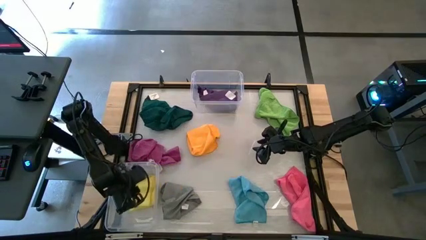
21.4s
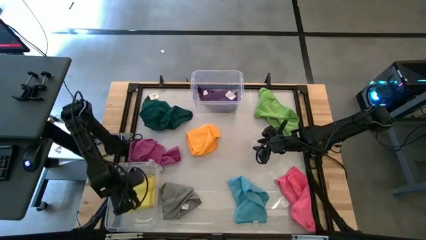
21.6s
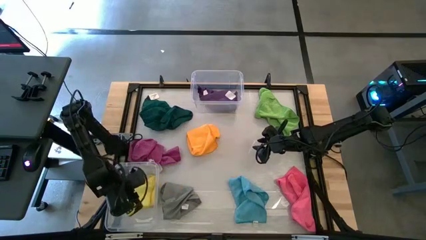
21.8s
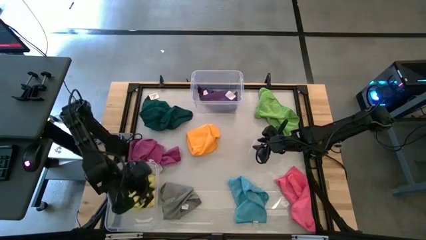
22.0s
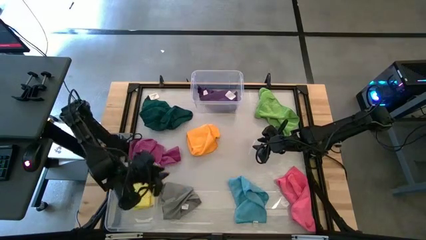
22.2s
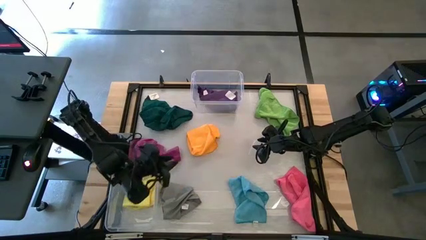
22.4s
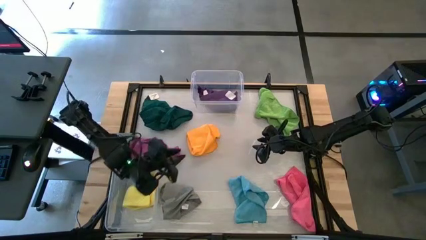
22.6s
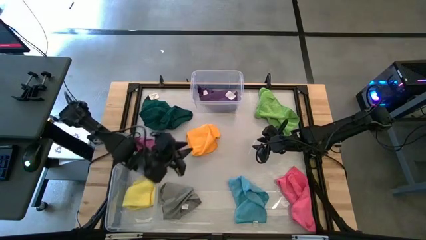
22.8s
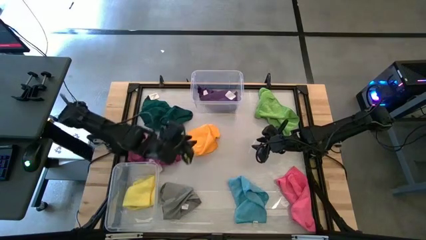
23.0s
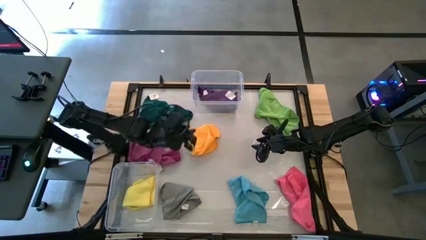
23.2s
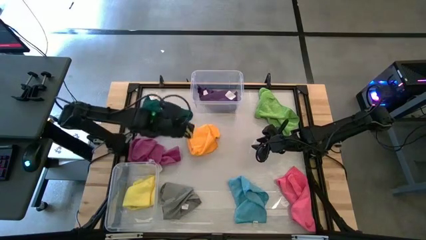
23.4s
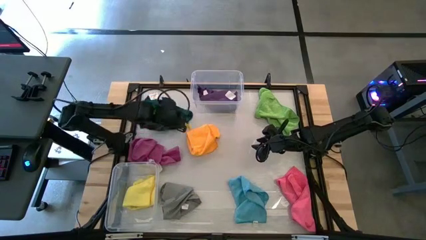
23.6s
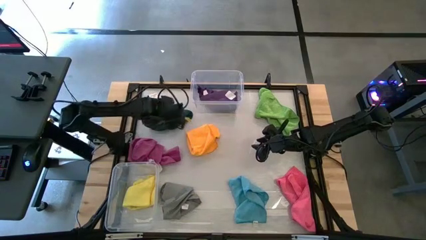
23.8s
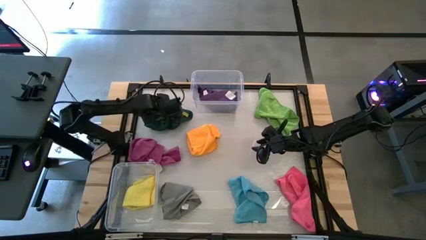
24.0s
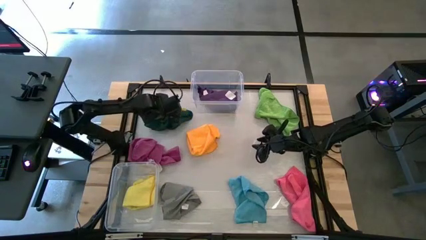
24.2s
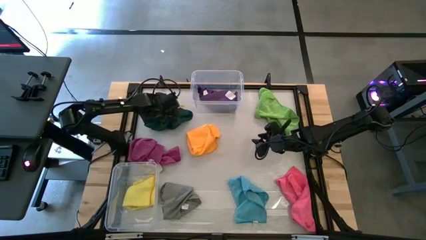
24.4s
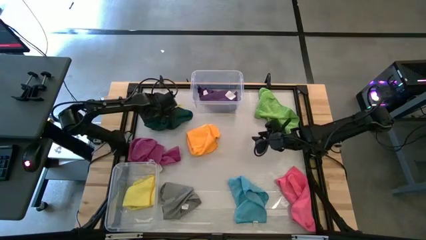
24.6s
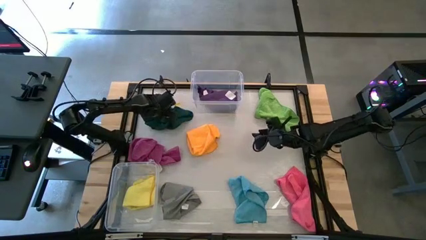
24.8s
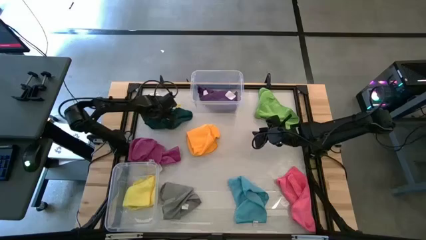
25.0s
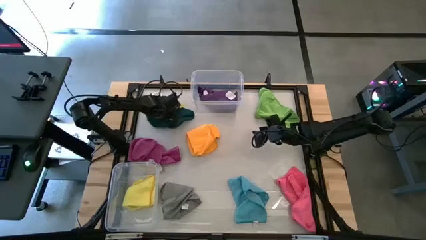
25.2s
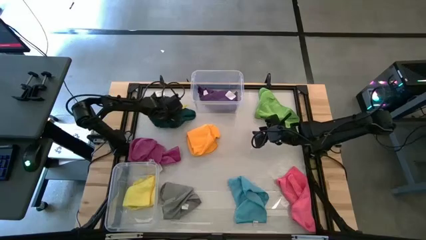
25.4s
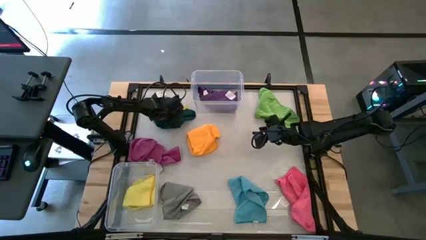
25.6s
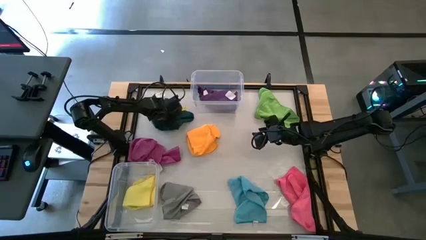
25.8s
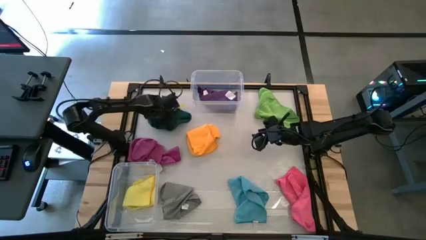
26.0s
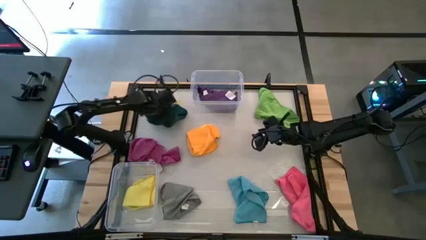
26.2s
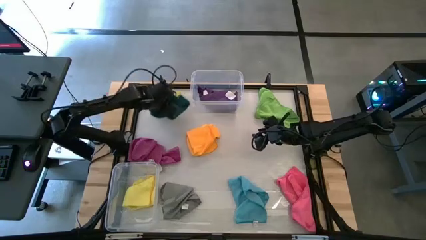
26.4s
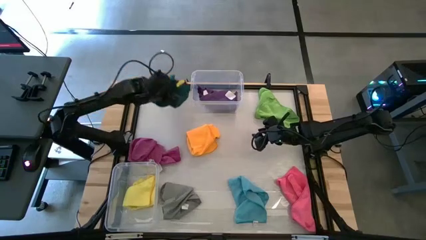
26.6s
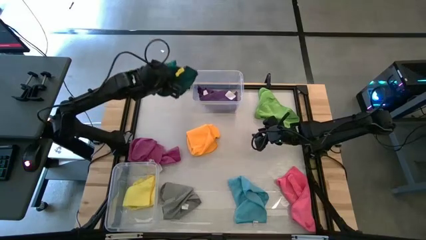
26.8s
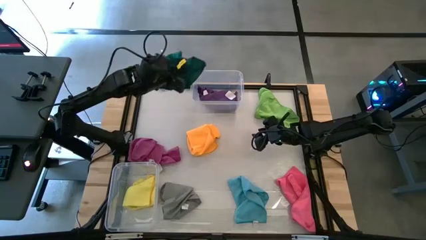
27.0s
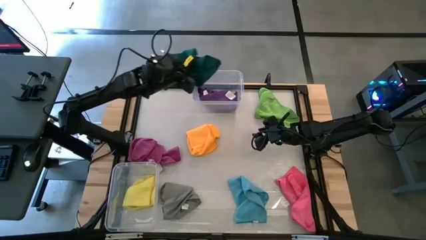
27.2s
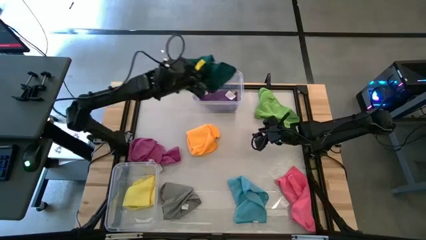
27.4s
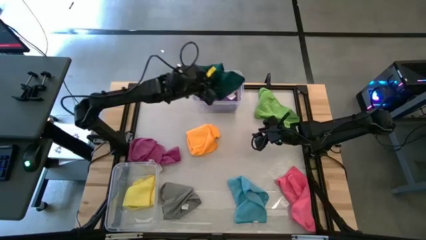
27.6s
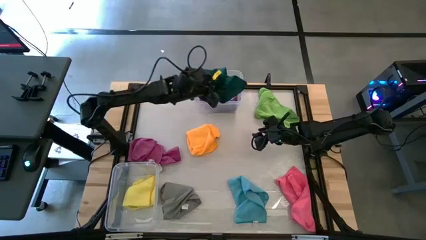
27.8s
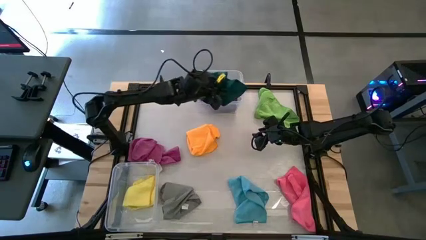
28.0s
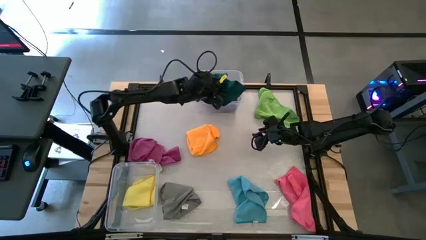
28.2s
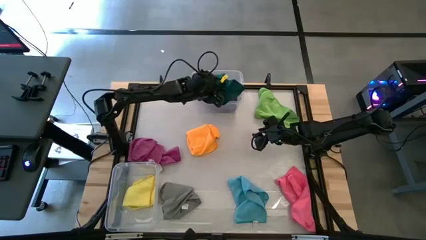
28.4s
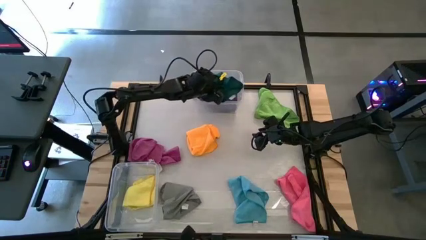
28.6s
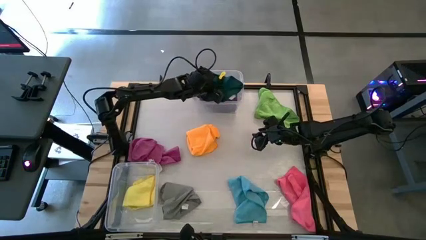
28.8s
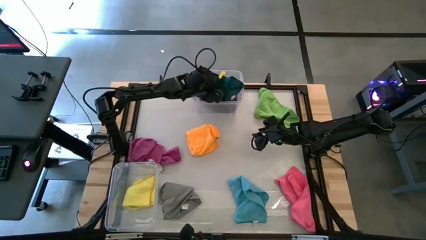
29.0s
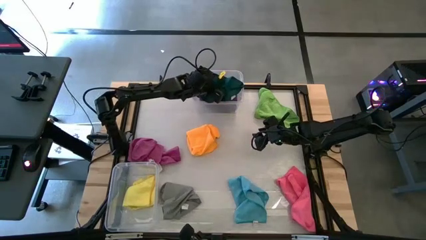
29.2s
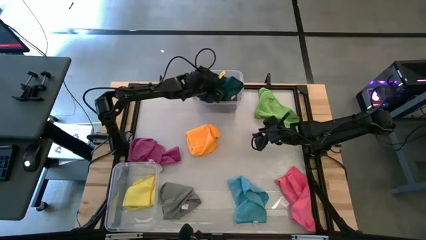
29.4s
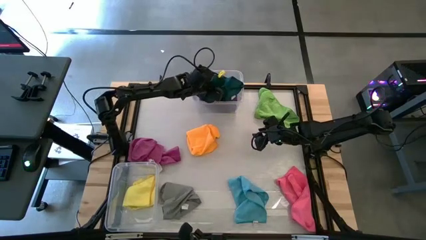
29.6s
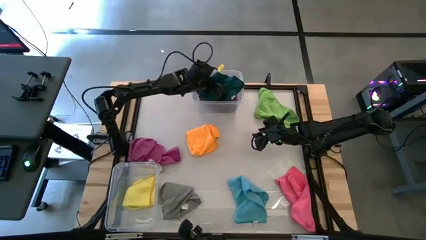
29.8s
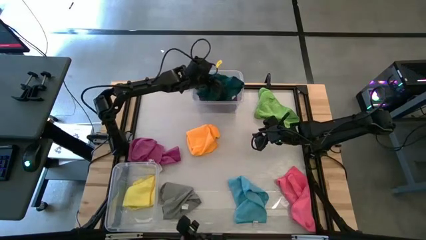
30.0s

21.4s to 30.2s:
Task: Sort towels by color in basket
Put the dark green kitchen towel into the top transparent bin

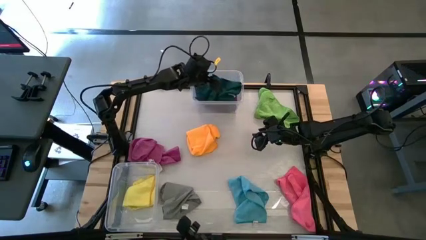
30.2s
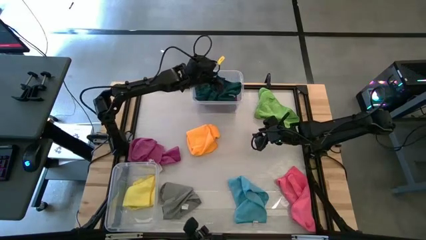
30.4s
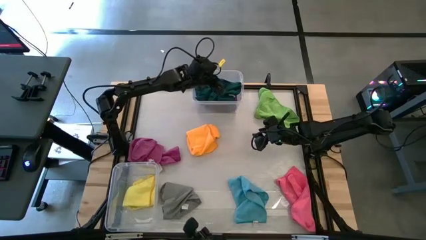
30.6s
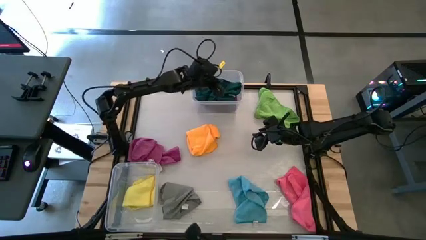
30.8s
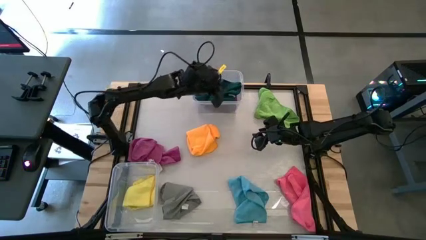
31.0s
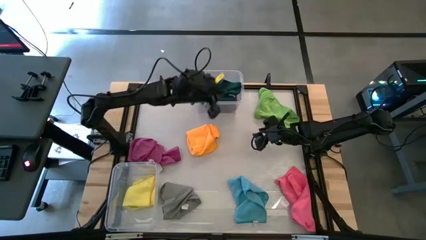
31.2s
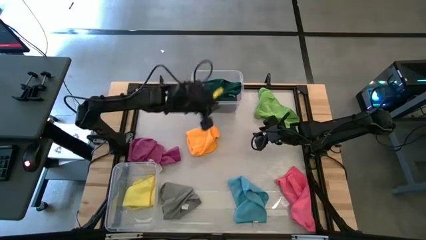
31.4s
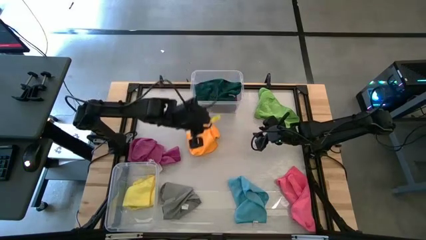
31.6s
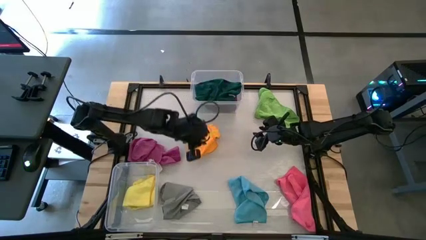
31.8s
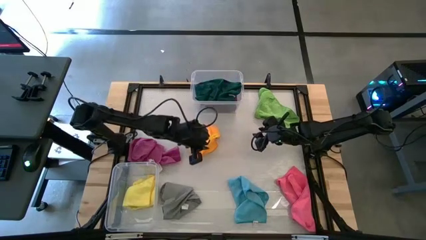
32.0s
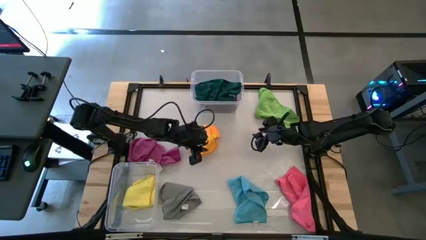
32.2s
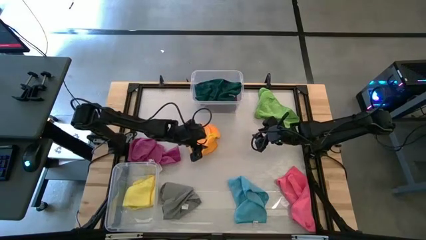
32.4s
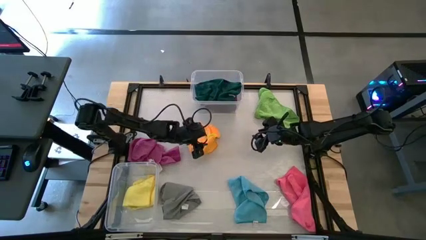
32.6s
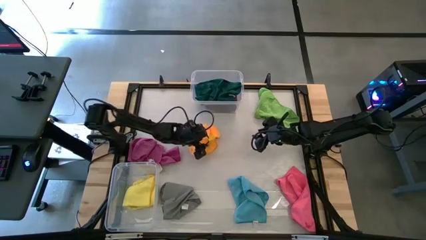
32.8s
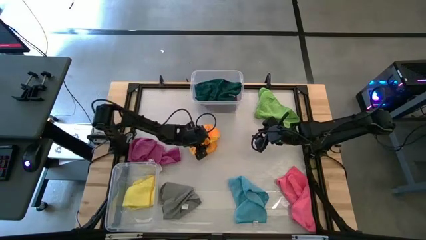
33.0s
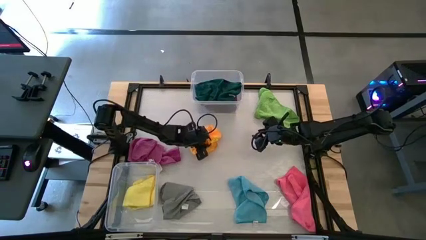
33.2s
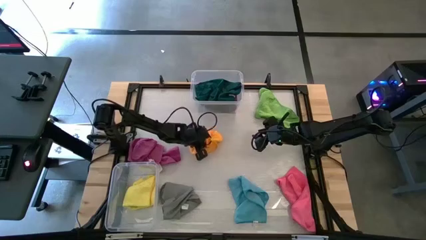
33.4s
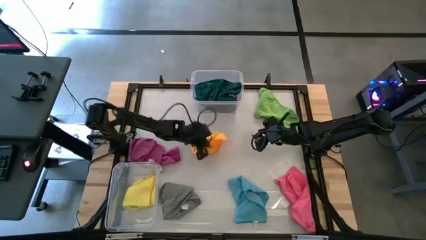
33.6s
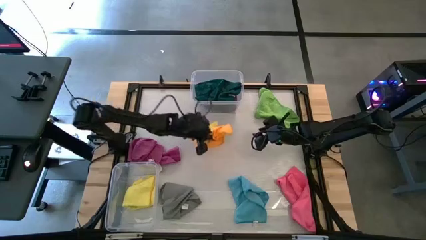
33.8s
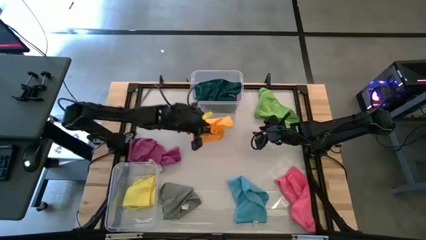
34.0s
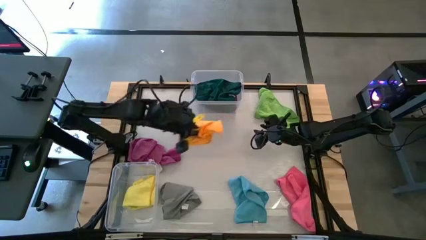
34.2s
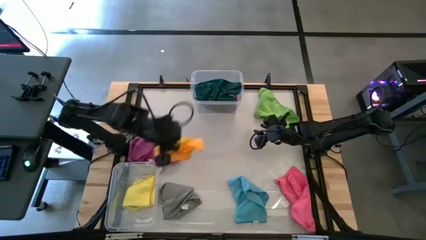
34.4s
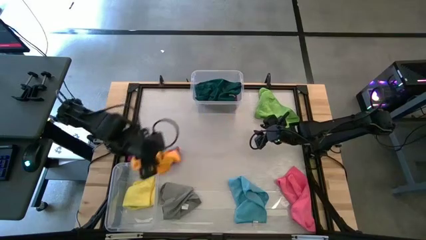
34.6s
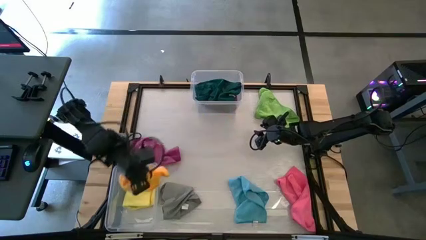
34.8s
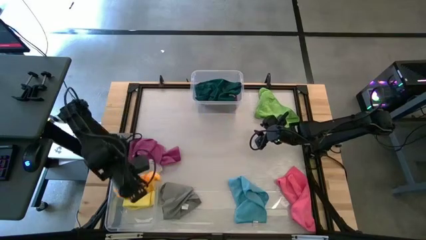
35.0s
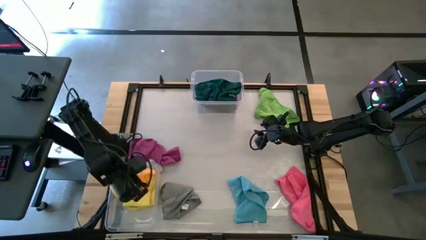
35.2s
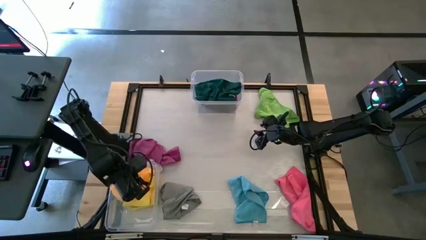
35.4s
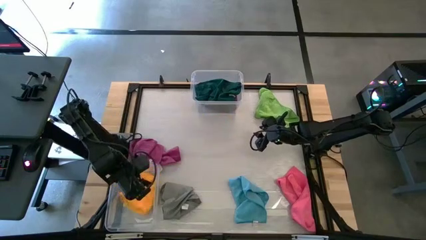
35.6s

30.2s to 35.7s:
Put the orange microfiber towel into the bottom transparent bin

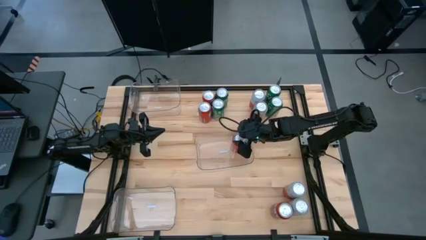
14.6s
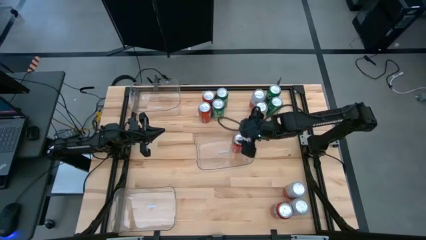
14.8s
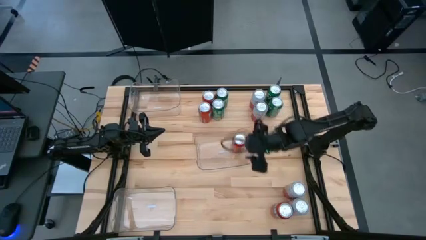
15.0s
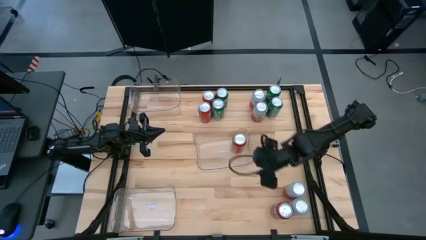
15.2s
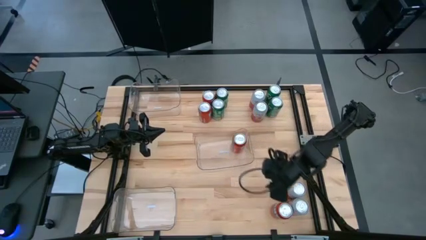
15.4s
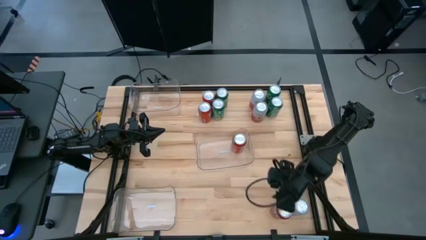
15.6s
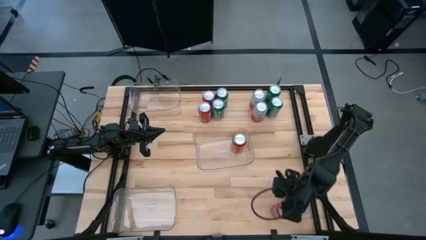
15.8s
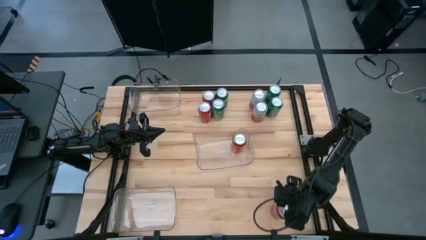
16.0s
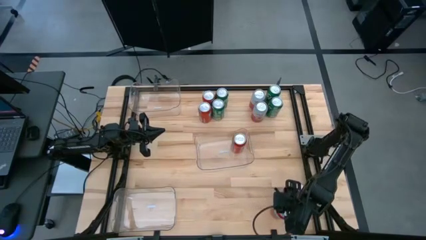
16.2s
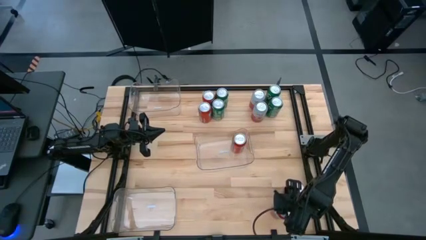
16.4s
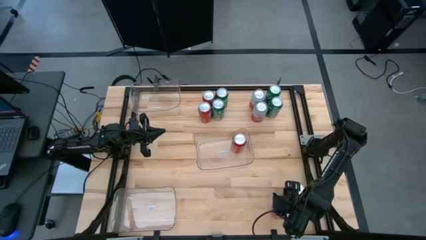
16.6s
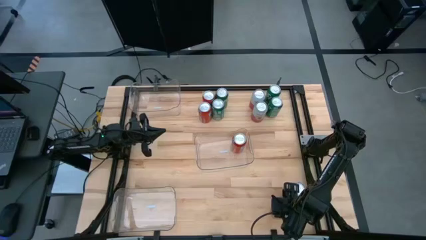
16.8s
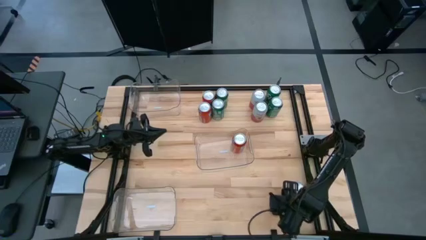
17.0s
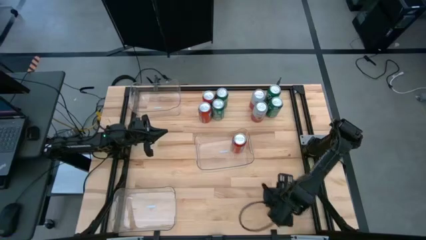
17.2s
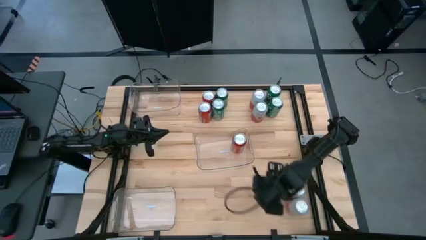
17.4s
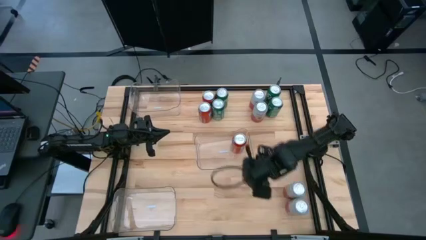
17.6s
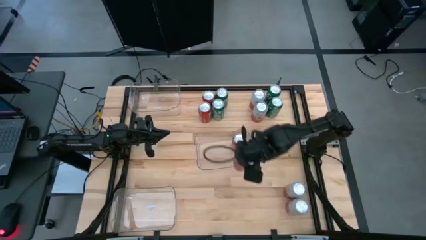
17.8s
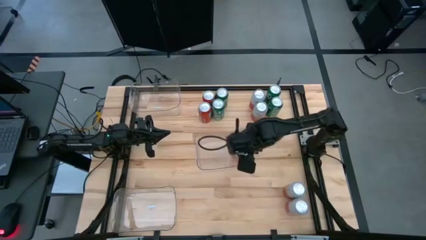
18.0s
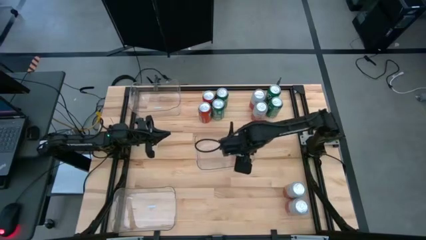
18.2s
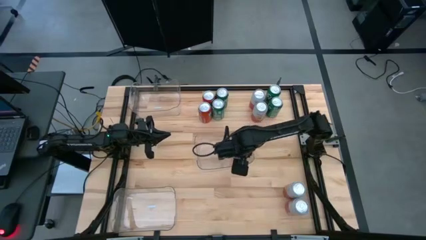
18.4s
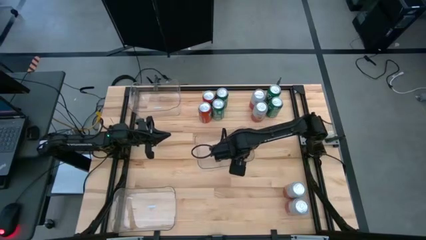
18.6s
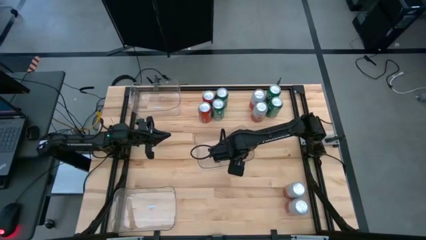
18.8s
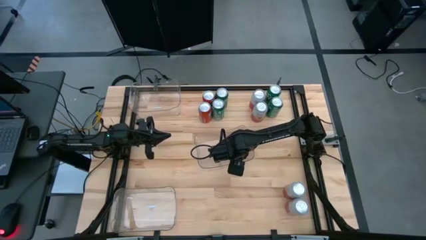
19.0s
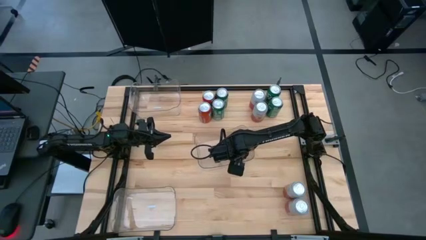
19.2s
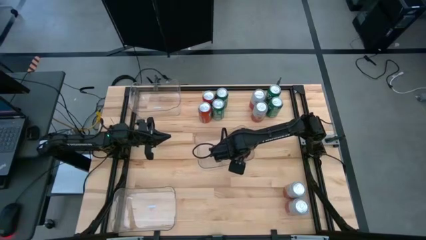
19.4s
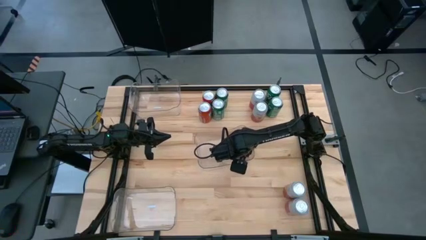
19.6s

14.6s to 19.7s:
Task: Sort soda cans
Put the orange soda can into the middle transparent bin
